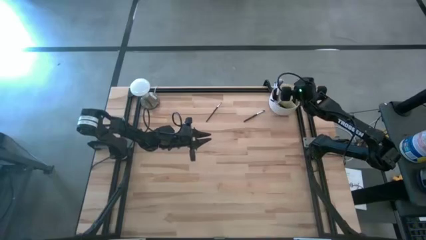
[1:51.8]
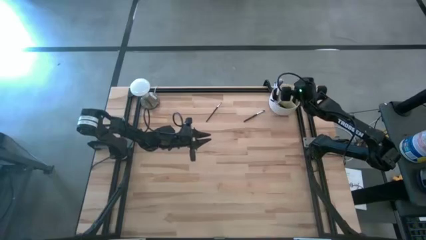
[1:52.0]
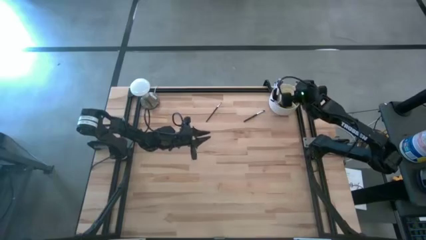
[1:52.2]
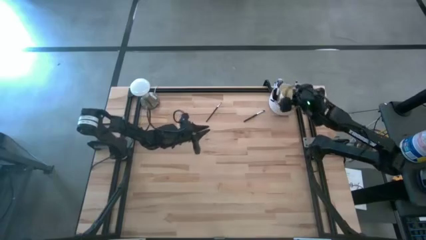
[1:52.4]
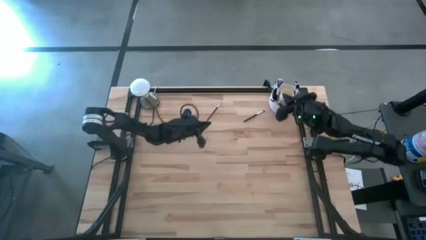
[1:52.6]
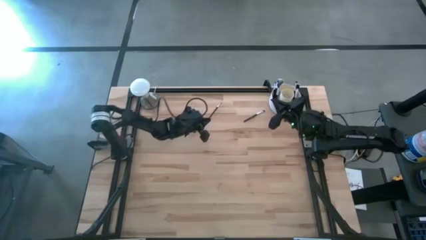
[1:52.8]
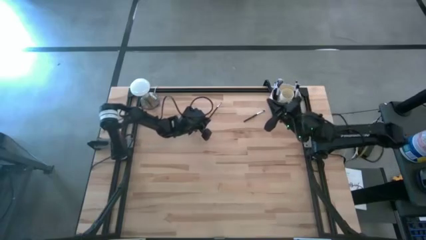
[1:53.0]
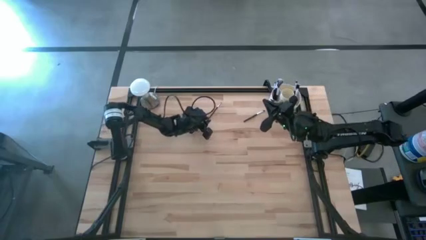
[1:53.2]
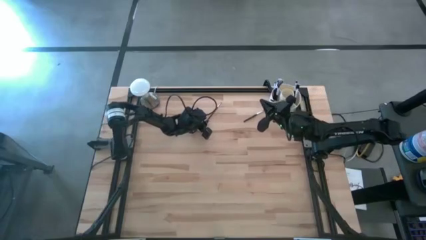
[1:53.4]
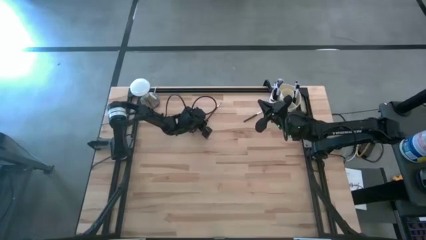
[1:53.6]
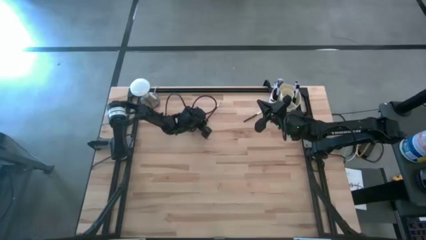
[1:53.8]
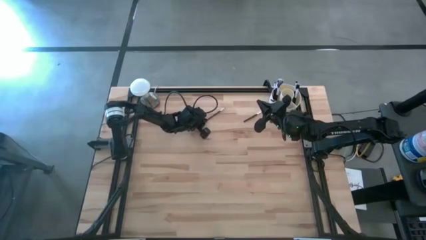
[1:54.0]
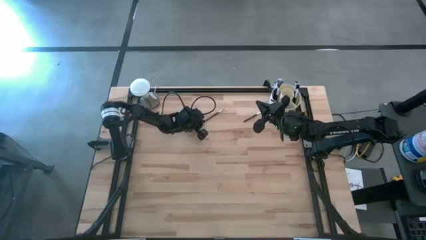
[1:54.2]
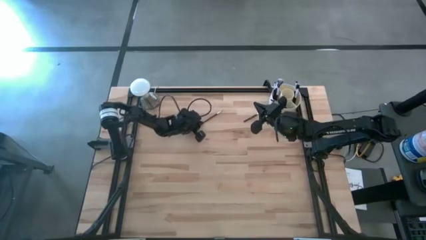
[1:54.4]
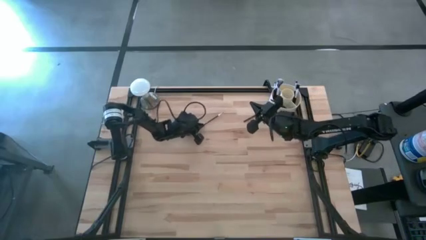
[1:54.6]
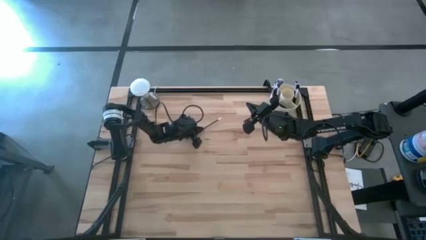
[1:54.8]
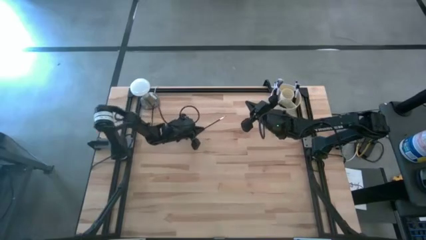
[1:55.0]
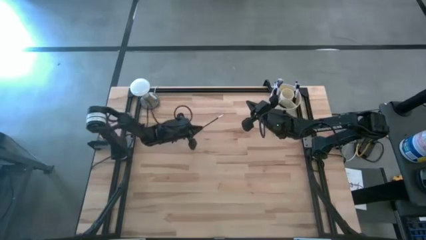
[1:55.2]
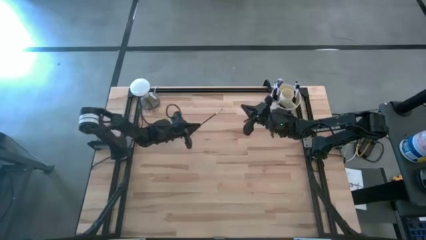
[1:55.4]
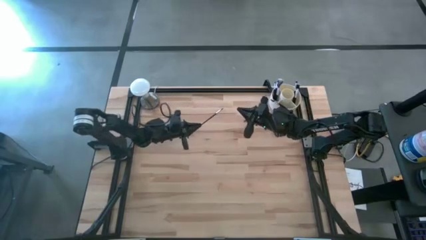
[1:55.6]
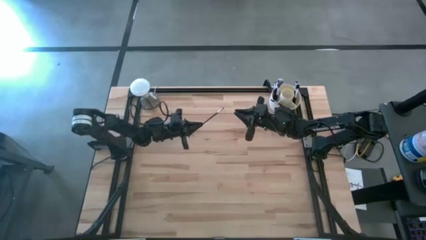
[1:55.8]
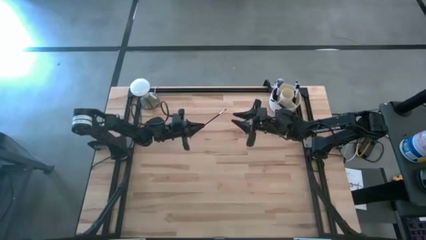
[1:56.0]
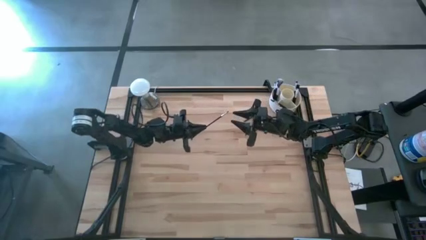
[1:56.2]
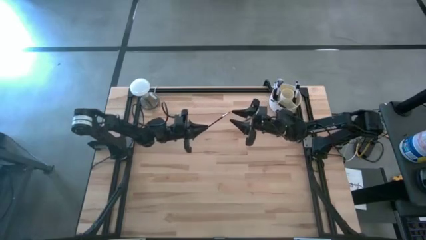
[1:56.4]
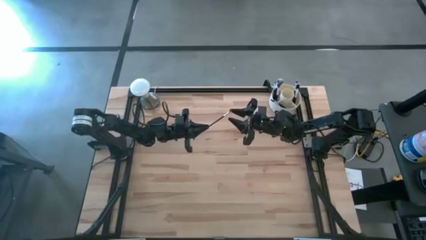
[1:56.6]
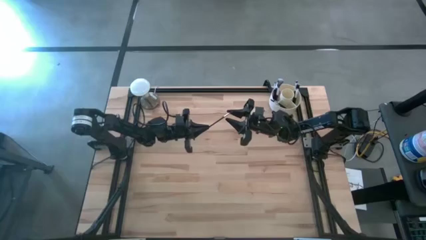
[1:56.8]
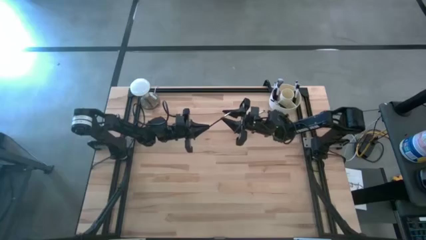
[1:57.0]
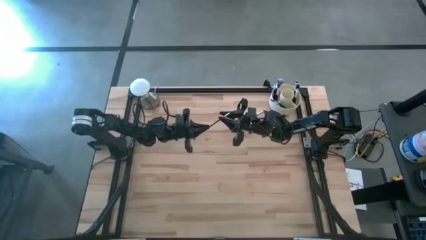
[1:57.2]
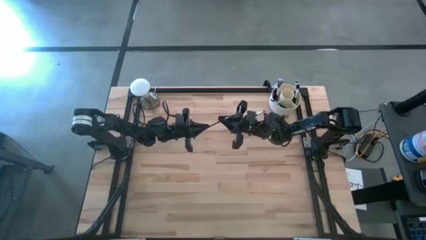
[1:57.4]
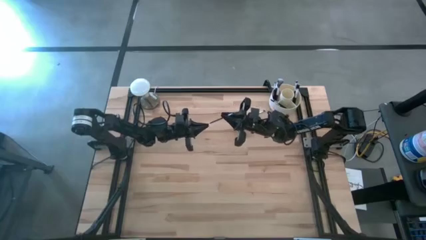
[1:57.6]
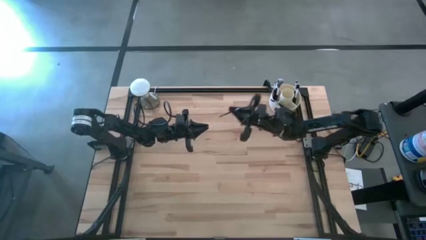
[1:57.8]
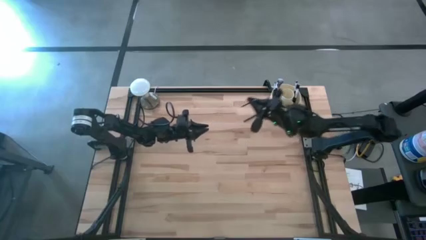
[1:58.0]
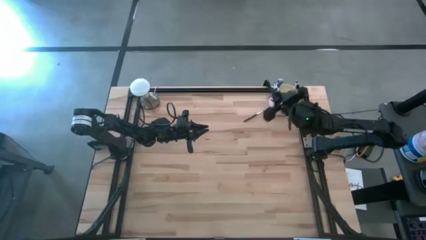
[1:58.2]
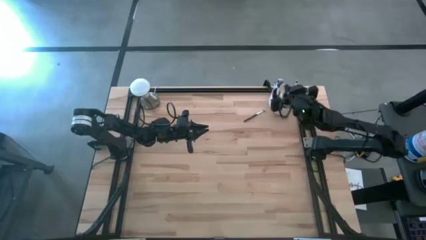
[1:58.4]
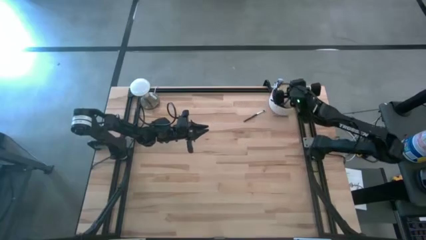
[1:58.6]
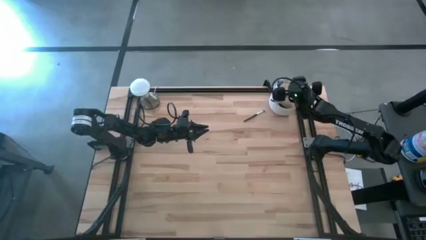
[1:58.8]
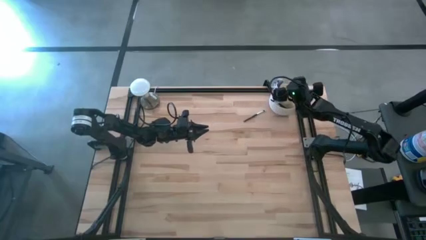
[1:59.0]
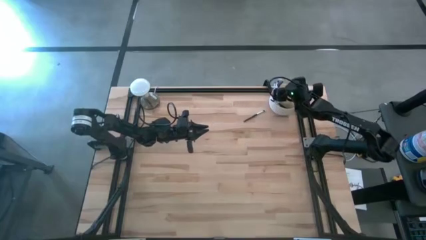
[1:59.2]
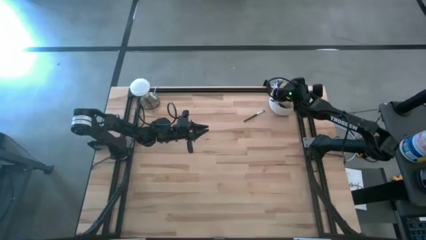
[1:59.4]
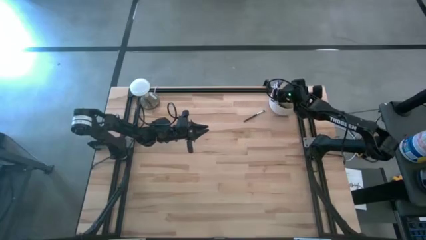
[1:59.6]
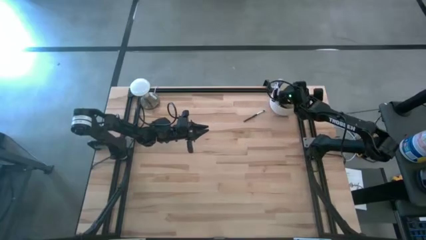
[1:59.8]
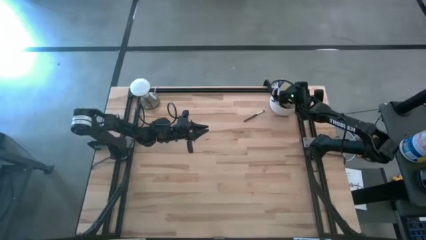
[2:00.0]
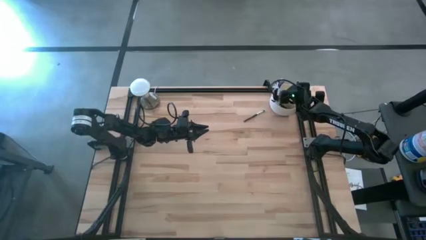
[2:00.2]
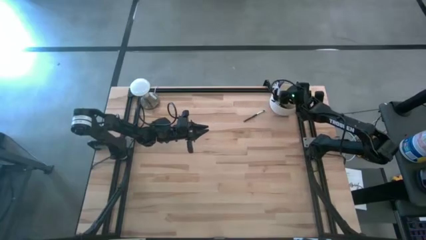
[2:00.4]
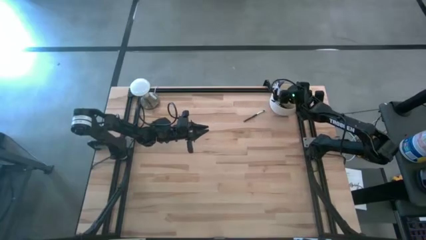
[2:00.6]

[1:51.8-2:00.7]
Task: Put items in baskets/containers
Put the black eyeshadow brush into the white organizer

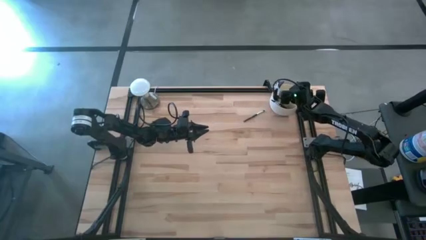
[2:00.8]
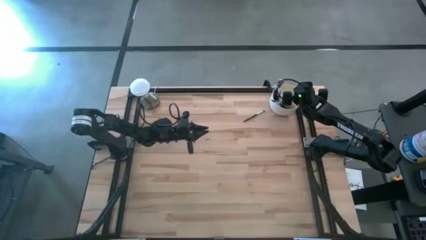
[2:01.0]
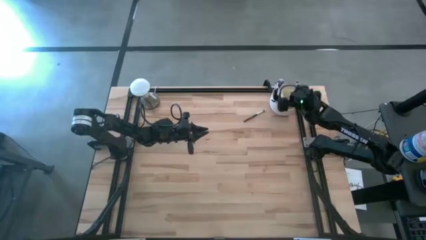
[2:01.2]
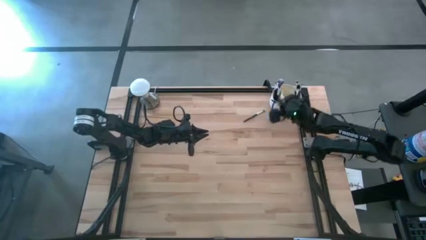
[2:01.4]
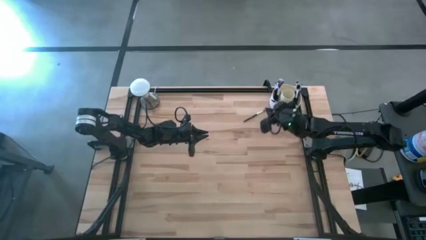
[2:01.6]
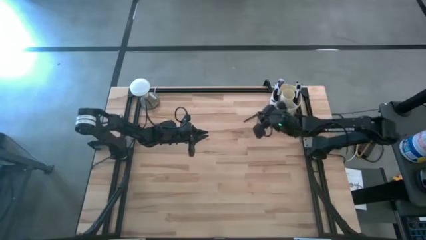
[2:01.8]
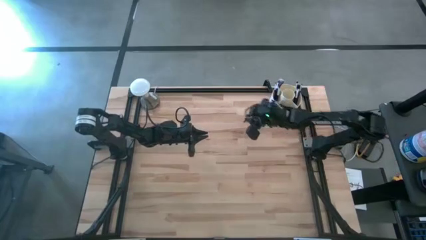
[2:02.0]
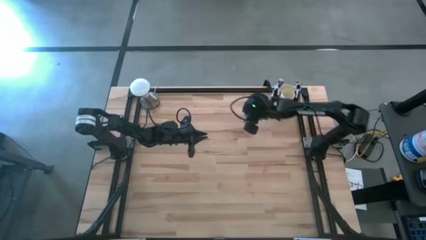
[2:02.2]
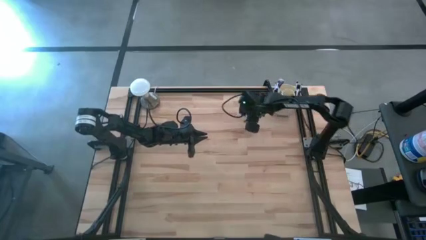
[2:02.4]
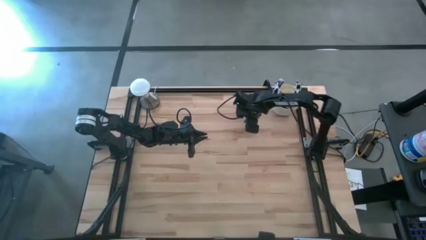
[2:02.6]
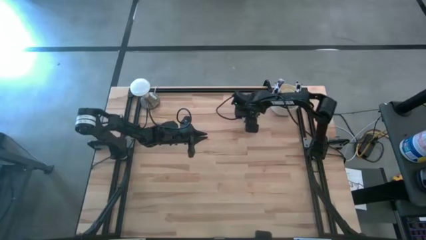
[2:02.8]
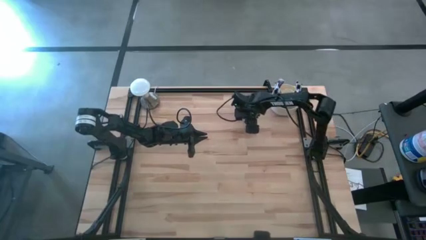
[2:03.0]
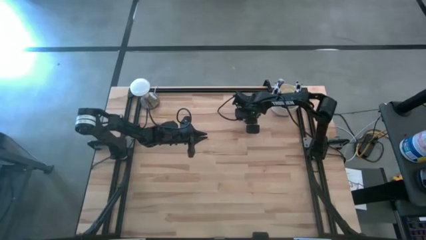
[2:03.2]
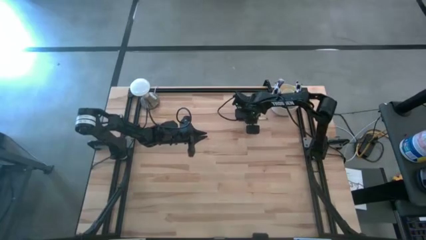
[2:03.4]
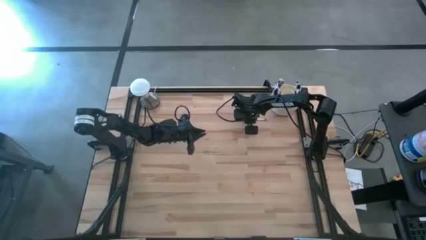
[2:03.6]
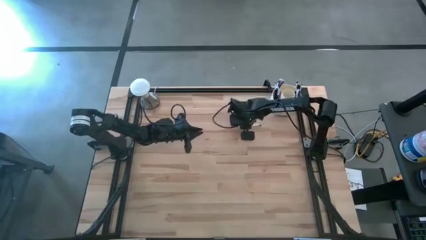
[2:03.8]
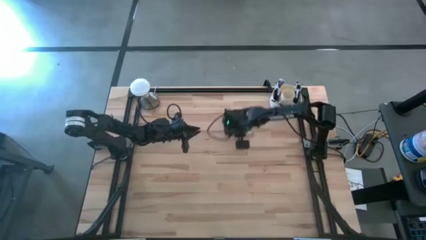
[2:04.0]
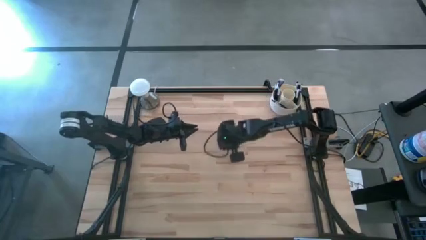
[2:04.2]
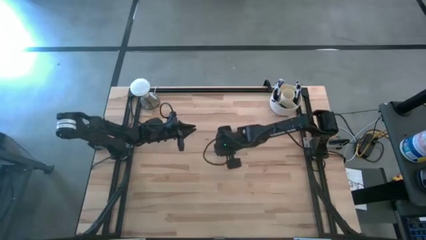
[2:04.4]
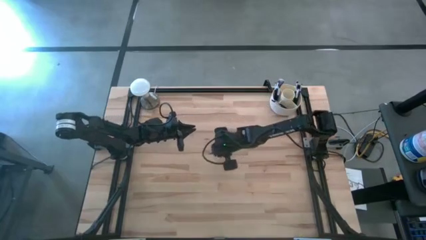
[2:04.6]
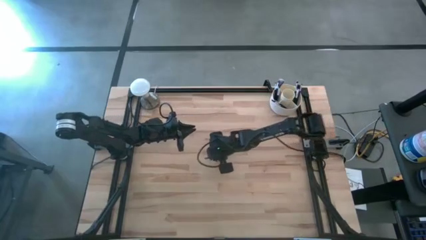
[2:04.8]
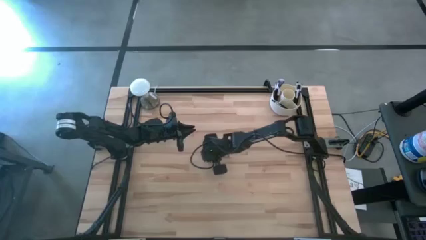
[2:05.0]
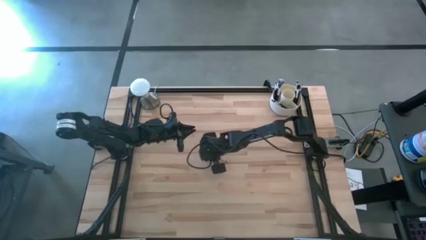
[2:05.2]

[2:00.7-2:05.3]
Put the black eyeshadow brush into the white organizer

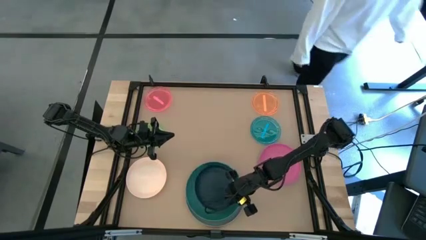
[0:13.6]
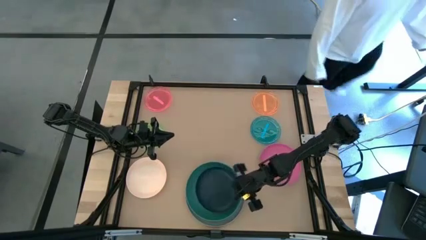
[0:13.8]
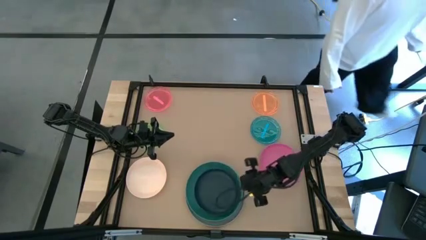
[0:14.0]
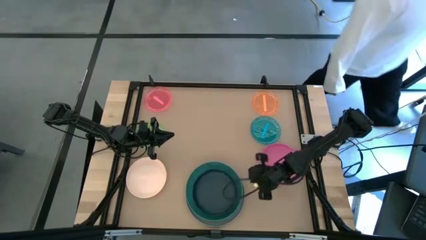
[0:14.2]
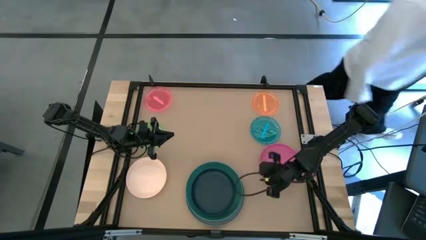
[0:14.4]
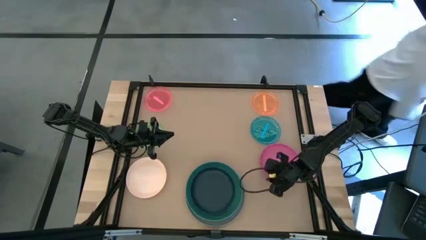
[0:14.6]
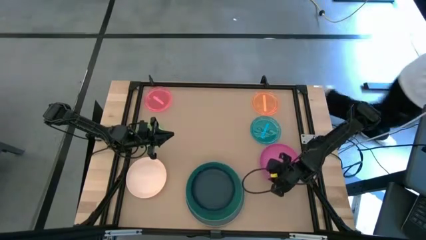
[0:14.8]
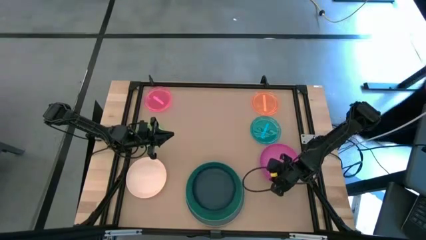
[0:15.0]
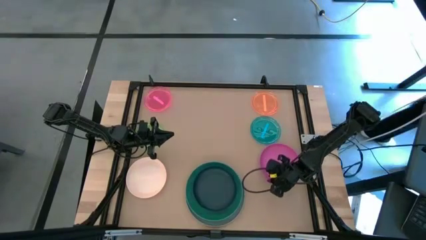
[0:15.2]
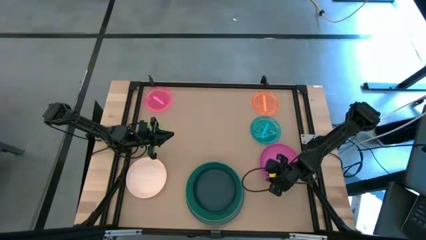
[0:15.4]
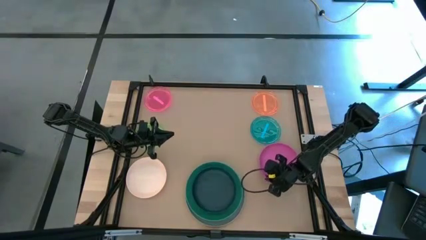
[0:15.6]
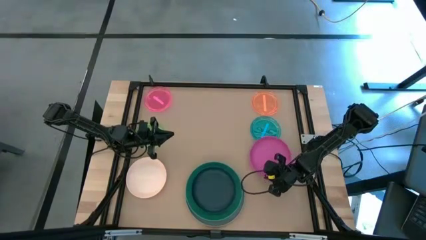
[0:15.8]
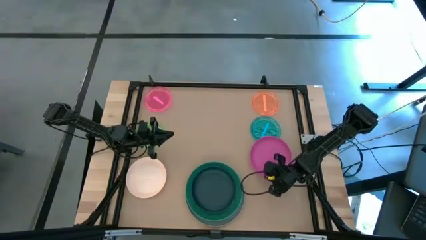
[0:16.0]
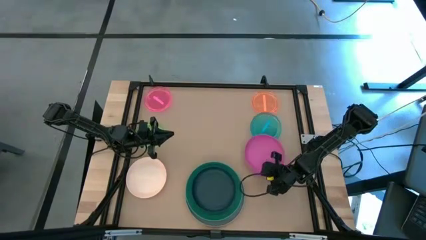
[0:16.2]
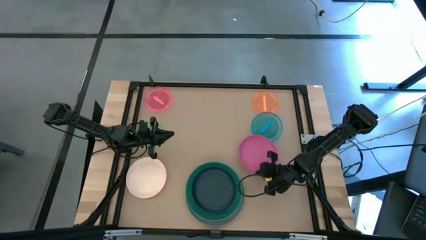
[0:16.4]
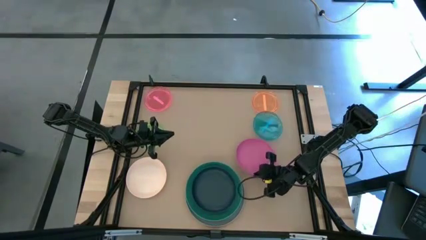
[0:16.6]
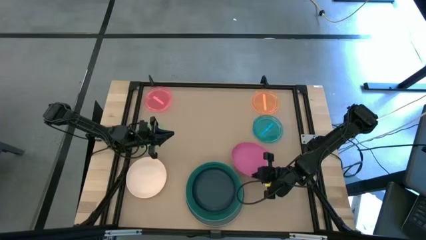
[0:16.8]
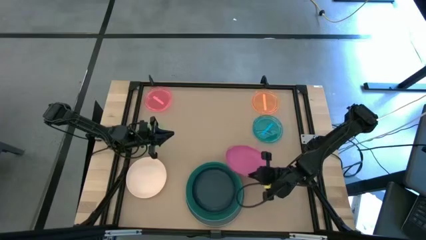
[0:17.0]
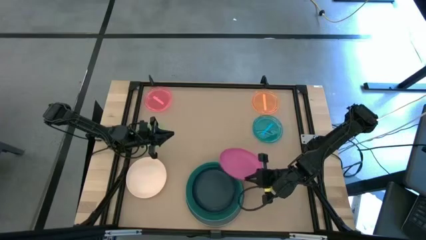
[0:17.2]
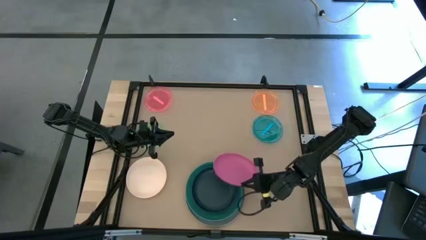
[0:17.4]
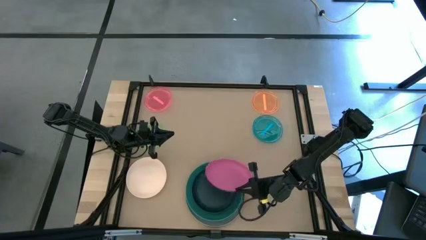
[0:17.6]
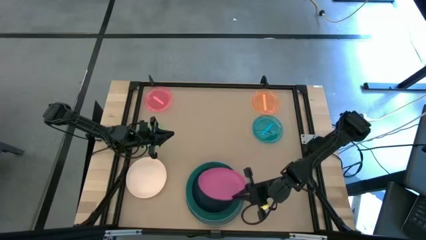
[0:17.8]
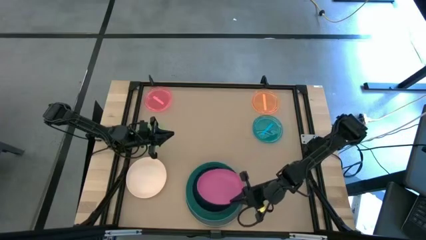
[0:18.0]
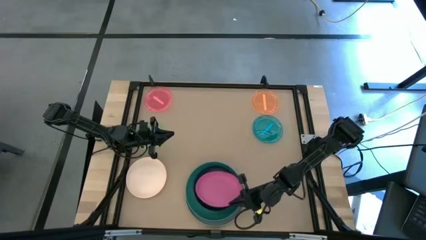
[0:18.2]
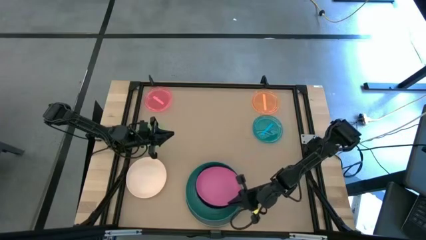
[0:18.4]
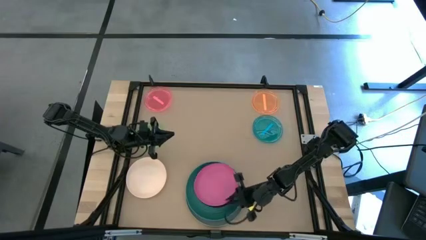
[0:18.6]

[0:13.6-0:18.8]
Task: Stack plastic plates
Stack the pink plate on top of the black plate
